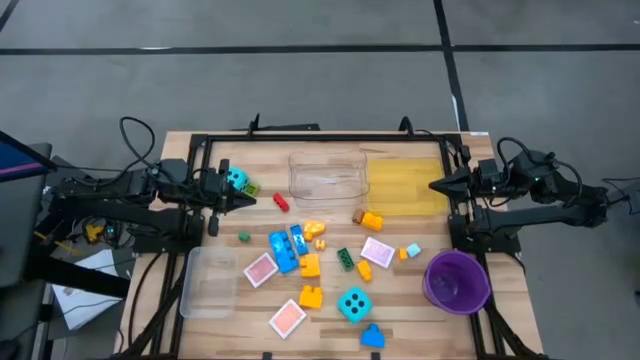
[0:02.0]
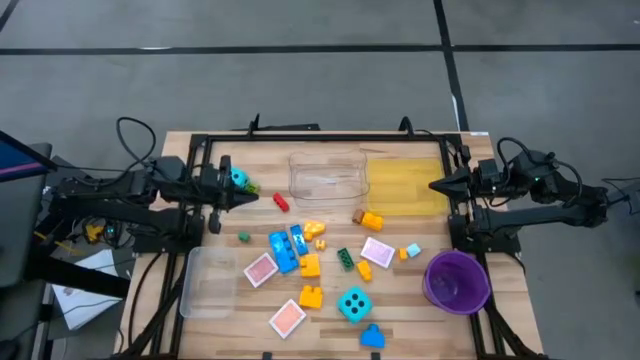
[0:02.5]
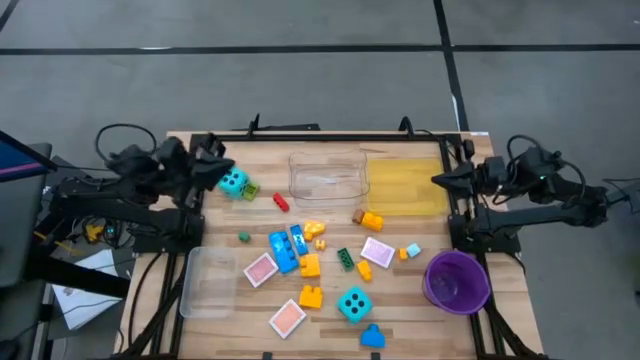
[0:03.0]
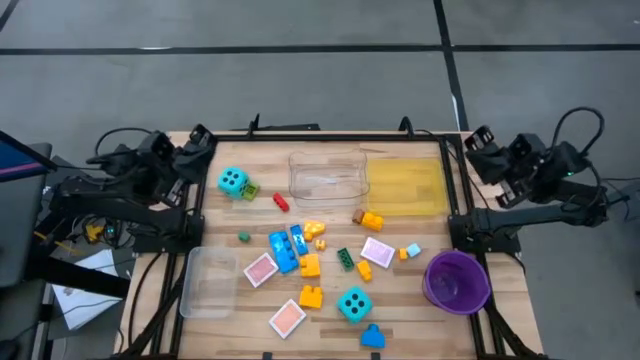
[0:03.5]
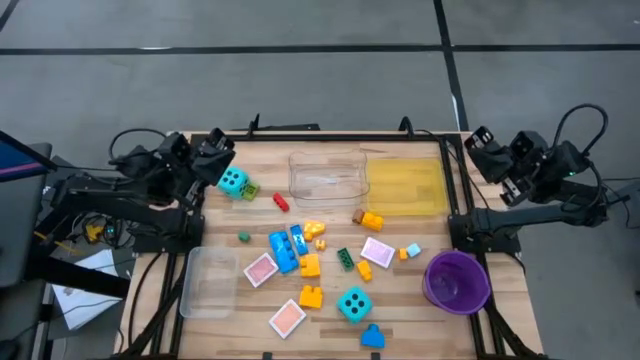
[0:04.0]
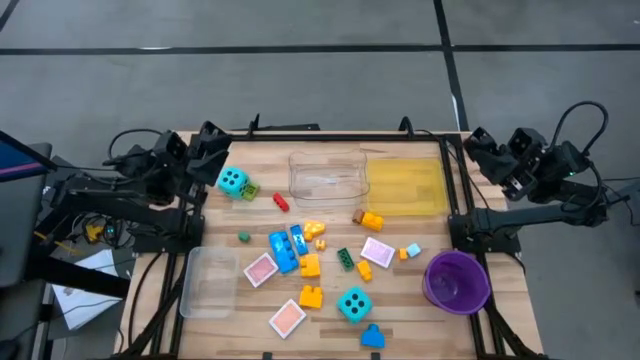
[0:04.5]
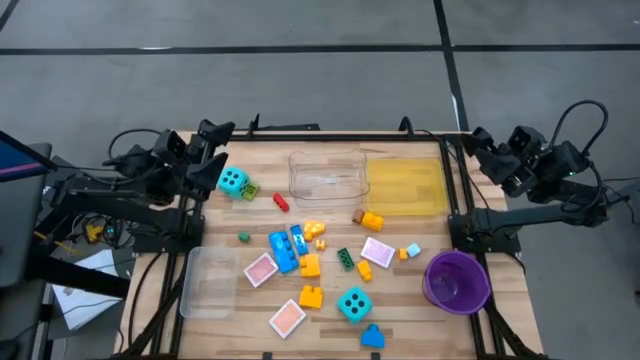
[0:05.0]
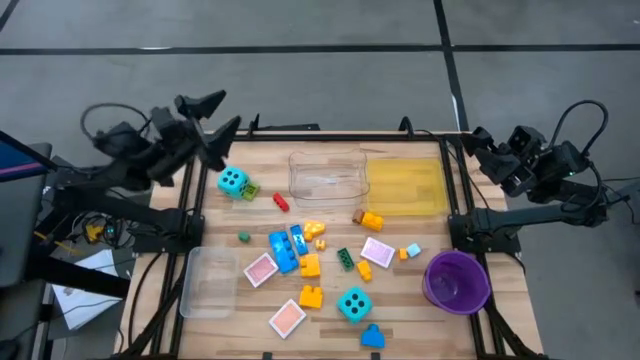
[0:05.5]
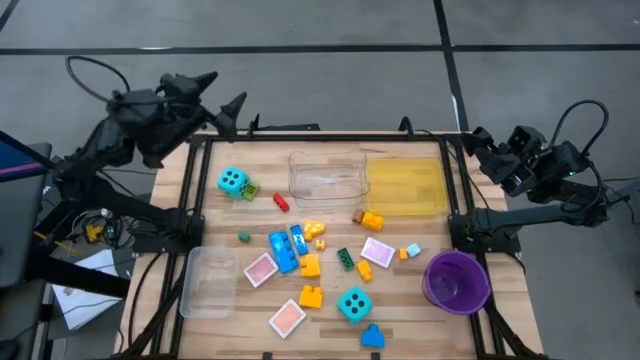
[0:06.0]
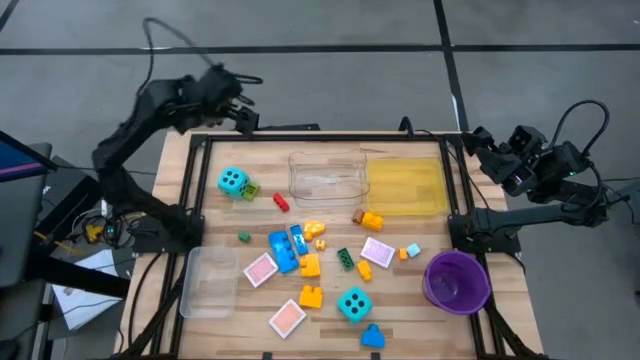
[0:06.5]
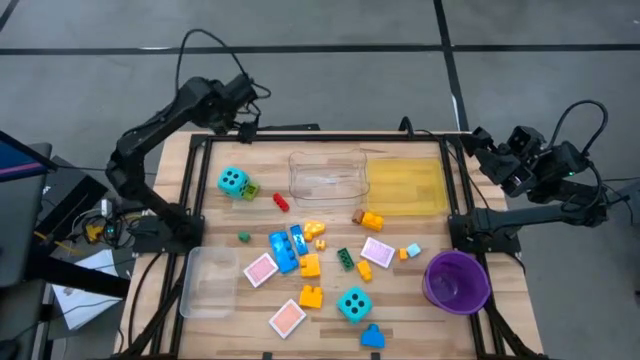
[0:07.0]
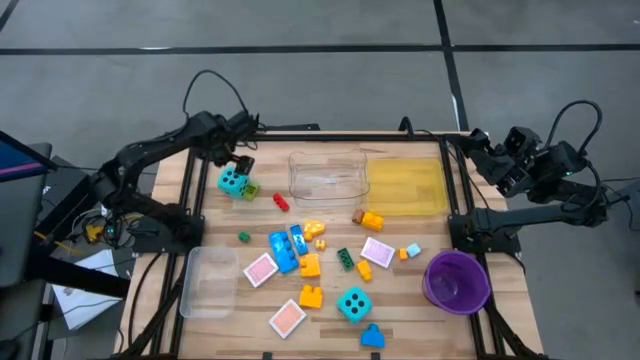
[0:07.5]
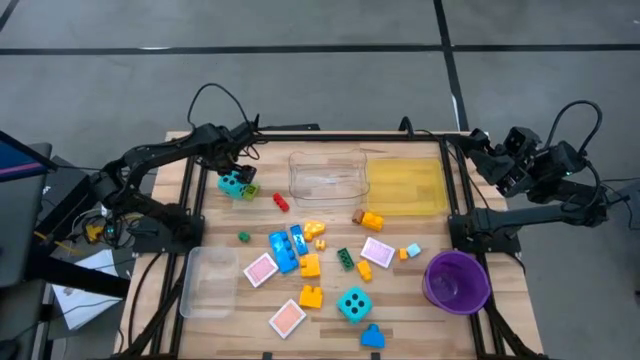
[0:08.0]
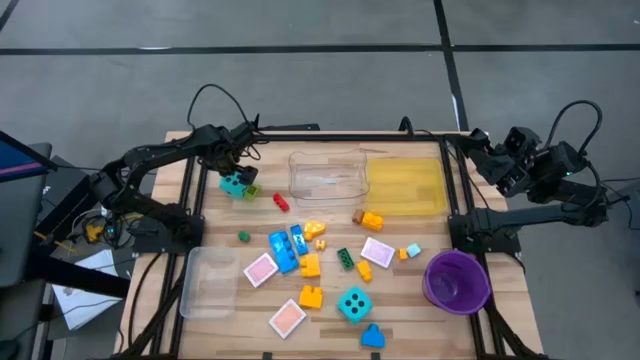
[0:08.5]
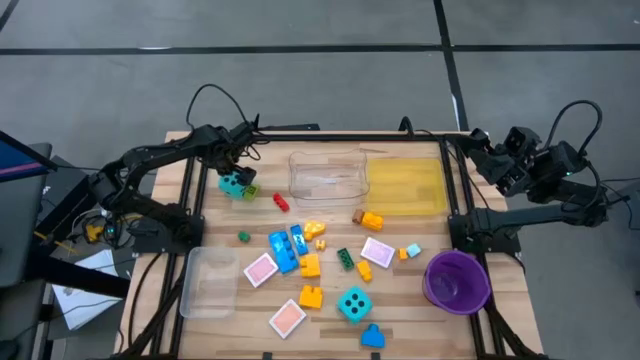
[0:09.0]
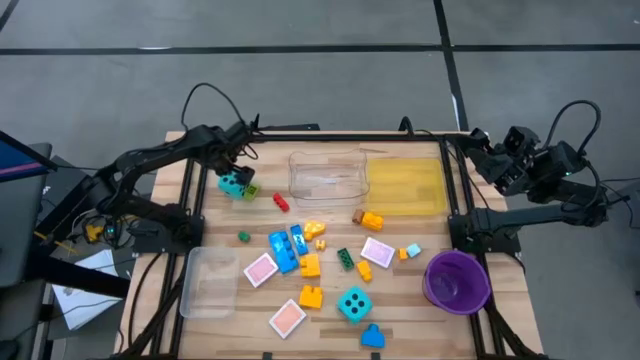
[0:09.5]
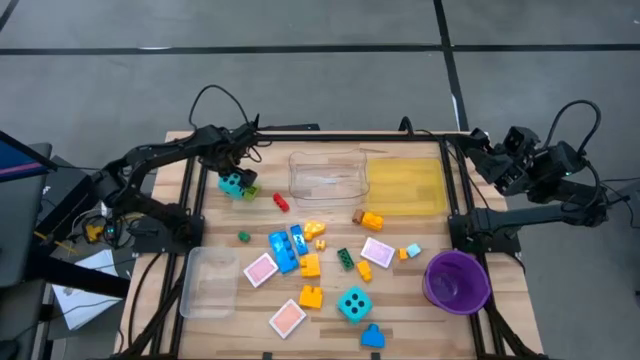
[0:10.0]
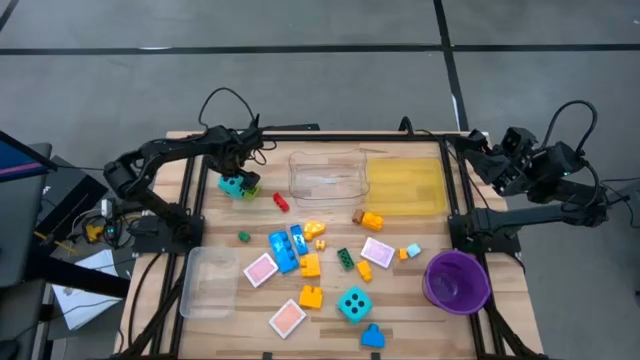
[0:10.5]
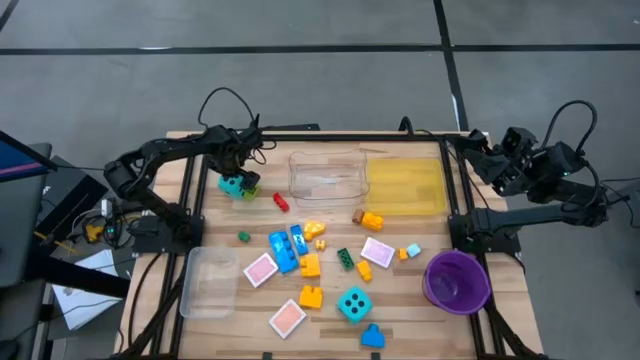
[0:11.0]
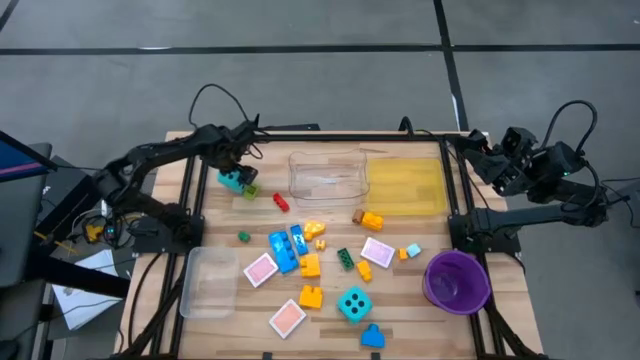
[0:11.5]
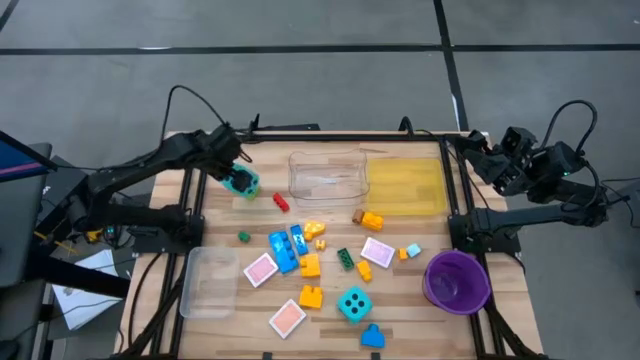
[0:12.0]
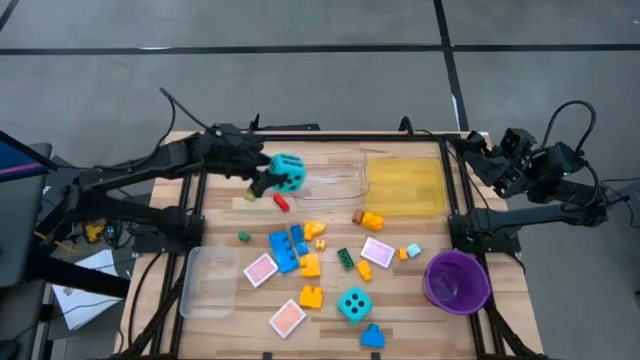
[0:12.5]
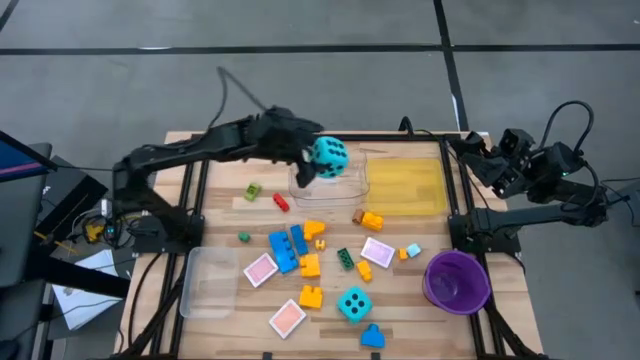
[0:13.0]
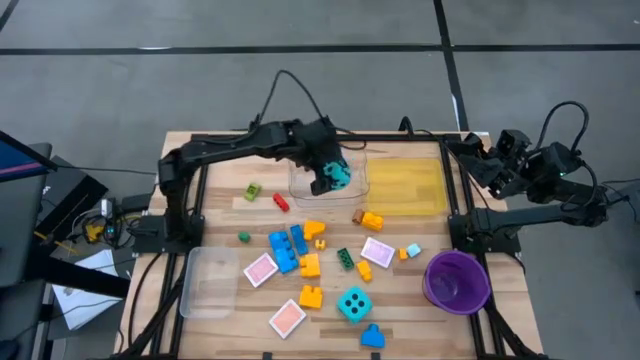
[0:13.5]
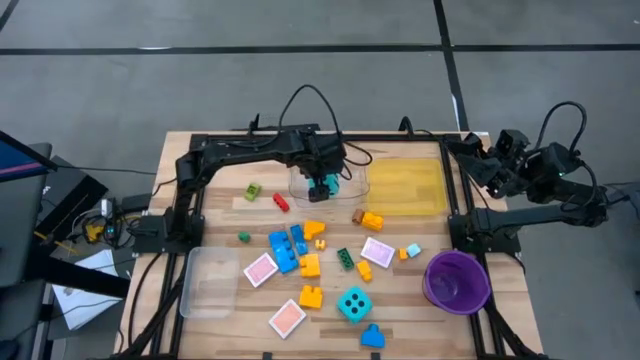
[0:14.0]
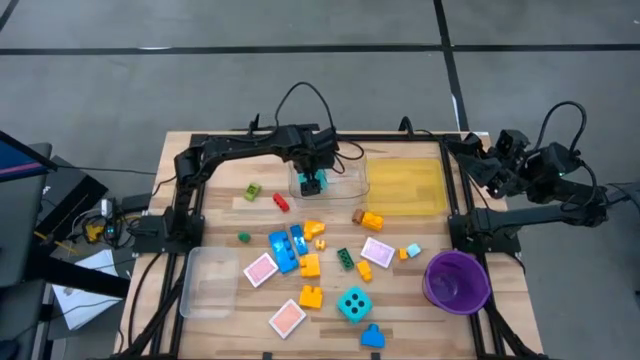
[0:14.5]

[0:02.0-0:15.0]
Task: Pick & Place Toys
Put the blue dice into the transparent bin
